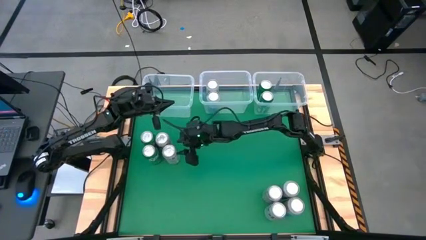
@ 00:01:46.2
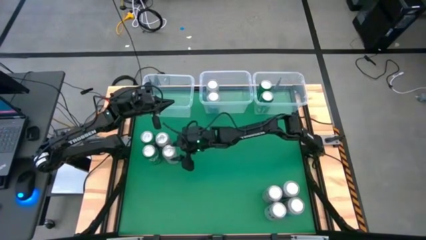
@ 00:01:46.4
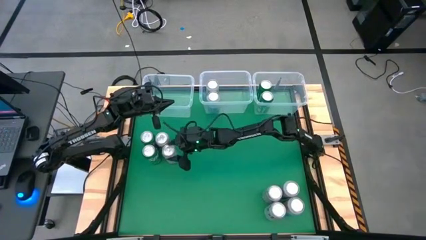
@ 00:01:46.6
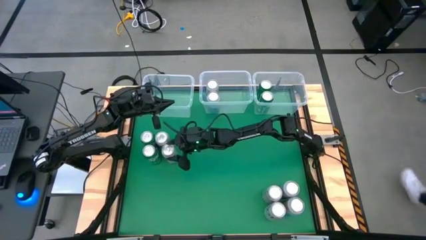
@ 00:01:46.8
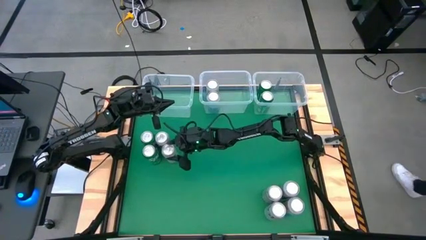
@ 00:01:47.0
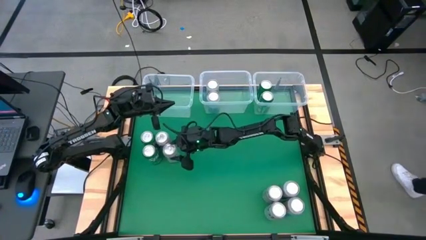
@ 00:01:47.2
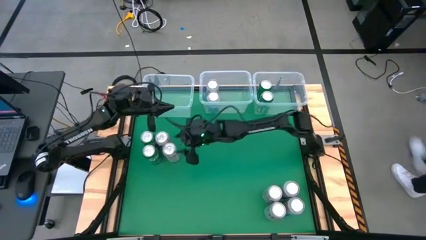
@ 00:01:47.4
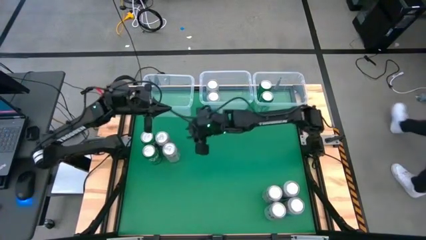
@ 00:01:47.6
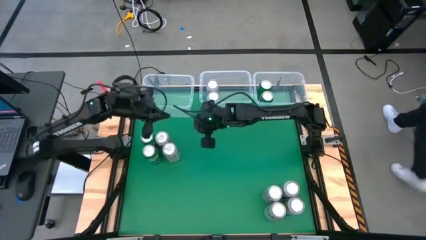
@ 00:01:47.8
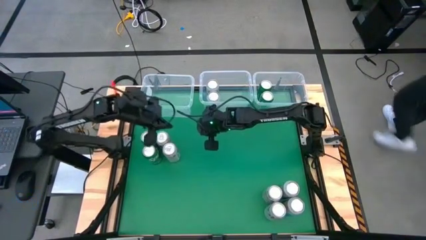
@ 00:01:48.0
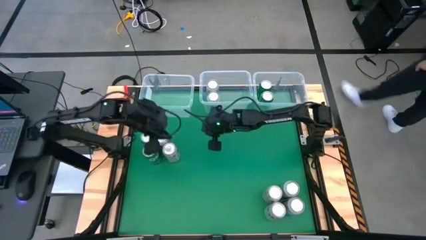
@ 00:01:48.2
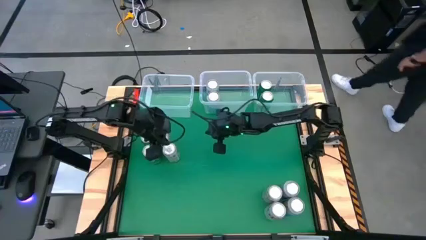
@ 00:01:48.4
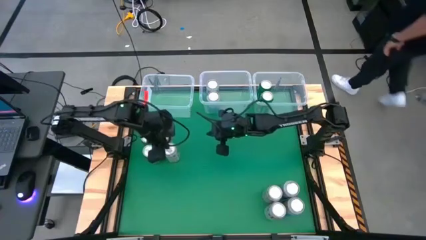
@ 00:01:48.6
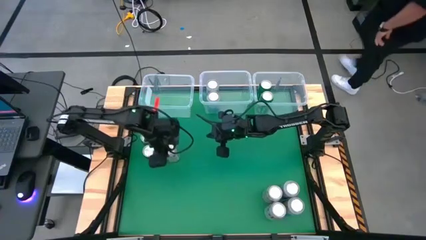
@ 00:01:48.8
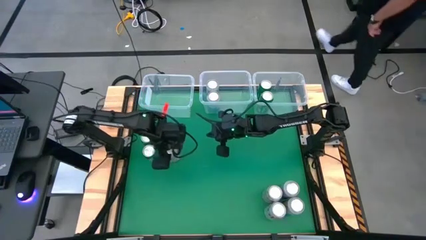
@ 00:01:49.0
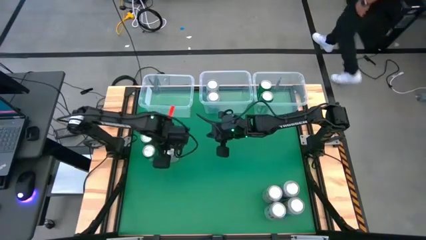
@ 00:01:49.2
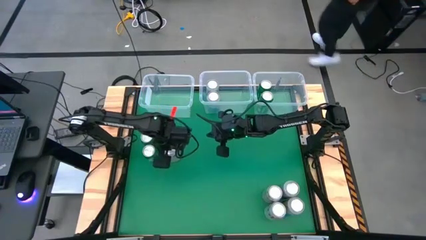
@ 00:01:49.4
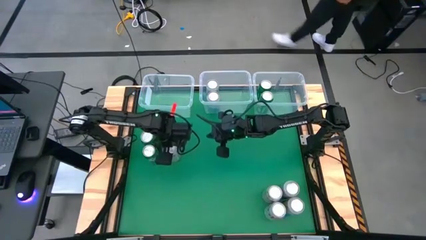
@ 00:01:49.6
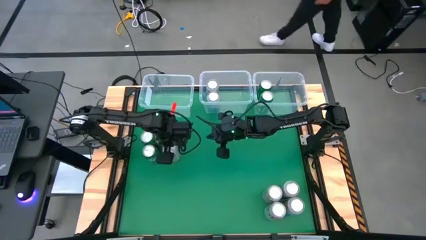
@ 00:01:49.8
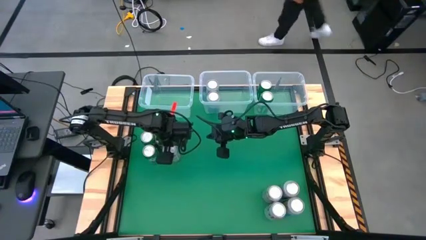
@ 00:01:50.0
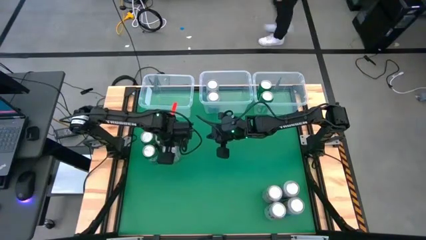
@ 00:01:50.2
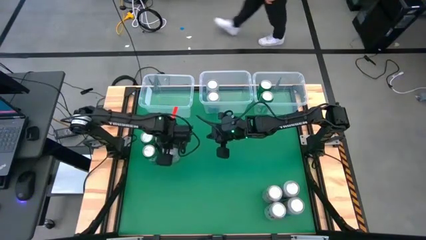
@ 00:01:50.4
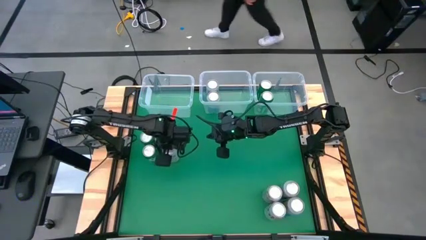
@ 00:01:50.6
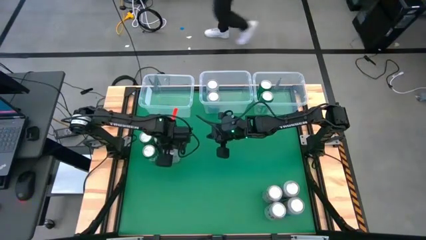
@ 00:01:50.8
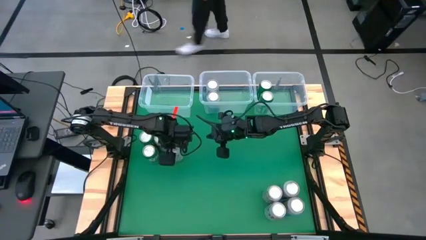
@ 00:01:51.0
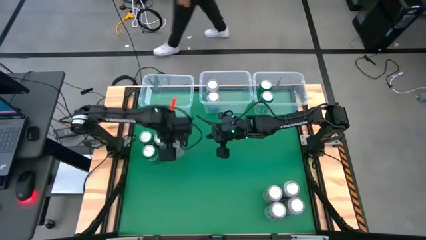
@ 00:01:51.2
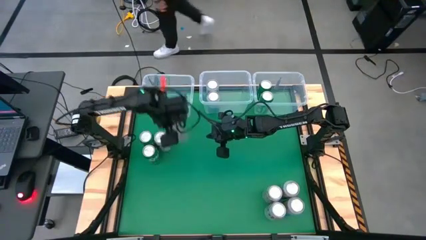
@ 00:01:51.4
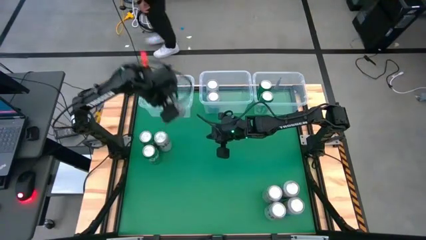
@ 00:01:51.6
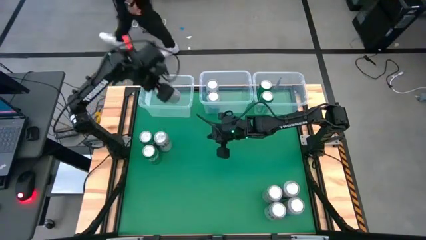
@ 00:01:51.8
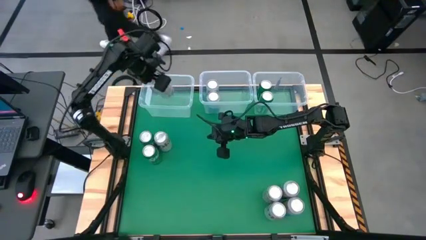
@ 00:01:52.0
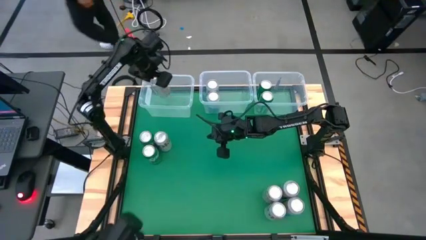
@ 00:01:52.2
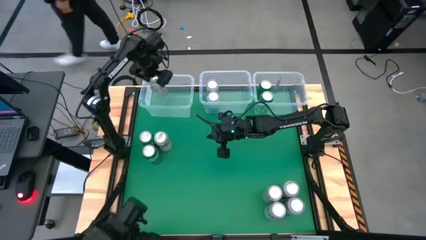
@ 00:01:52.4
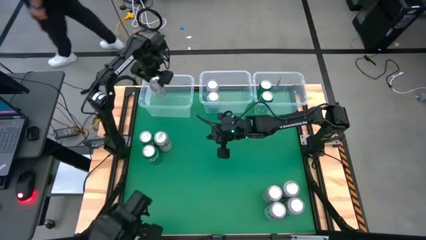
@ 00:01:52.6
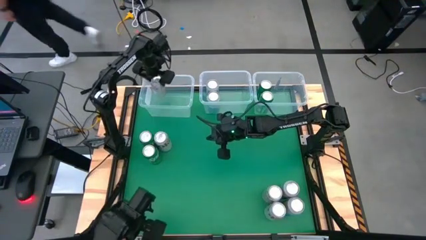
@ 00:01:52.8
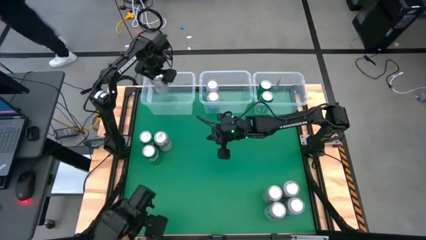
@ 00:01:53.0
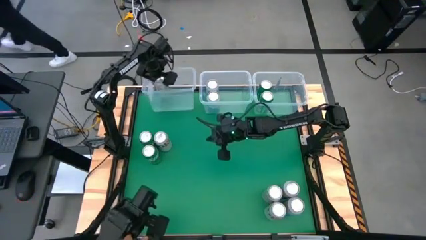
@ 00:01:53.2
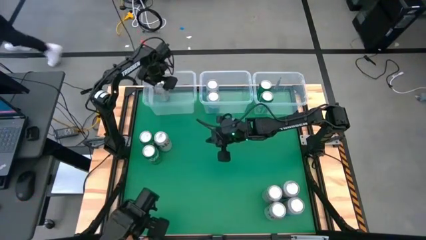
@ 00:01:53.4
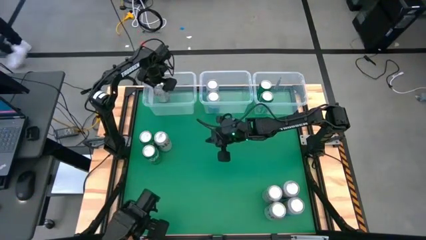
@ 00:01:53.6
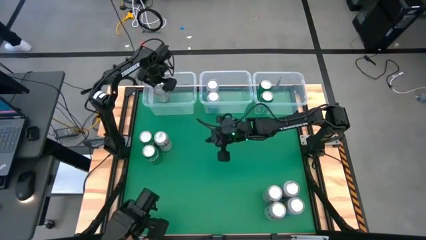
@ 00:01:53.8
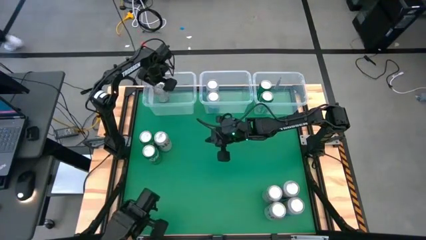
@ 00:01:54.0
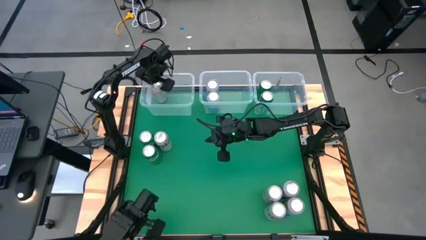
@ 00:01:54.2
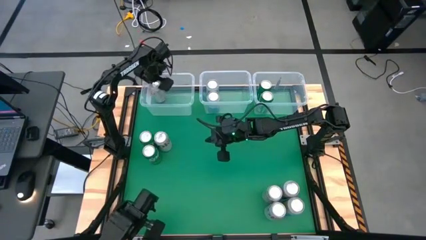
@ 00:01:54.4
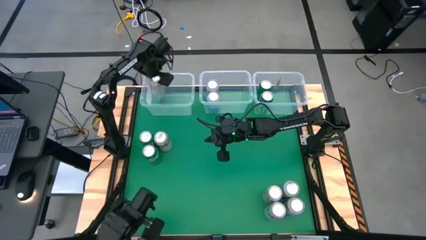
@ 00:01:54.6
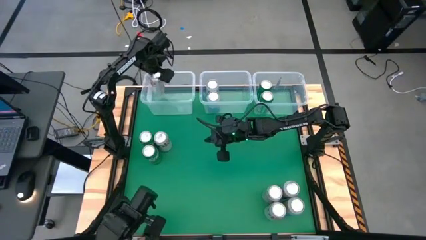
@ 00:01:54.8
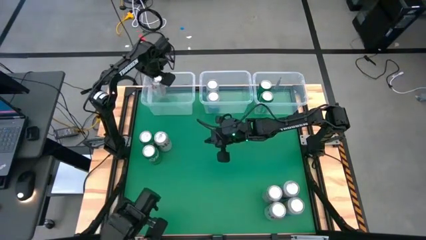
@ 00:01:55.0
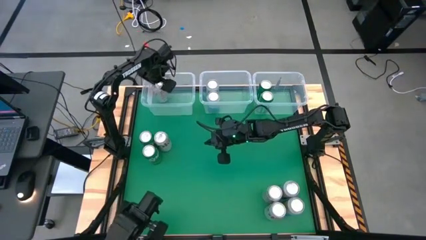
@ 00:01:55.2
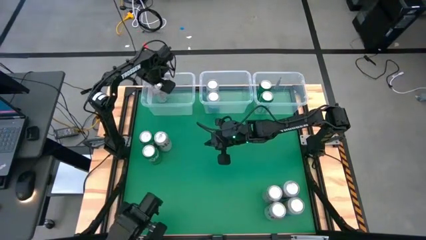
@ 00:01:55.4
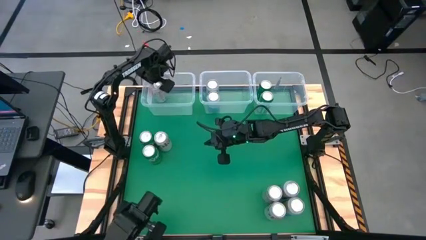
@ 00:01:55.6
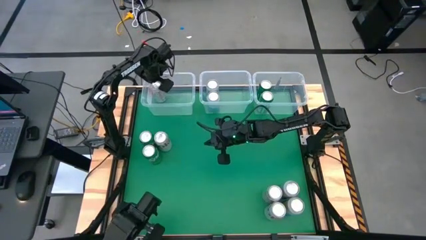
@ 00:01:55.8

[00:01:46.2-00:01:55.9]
Task: Sort soda cans
Put the red silver soda can into the left transparent bin

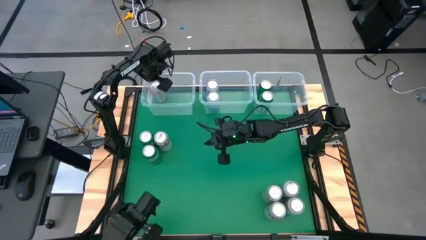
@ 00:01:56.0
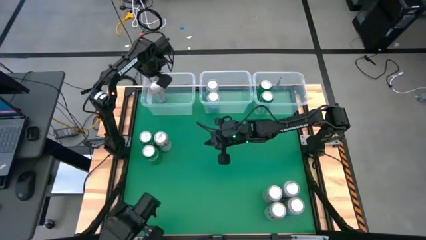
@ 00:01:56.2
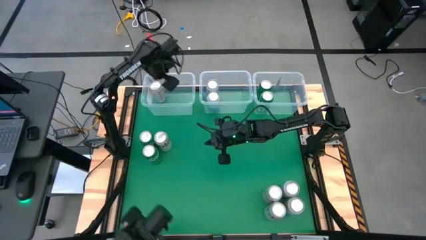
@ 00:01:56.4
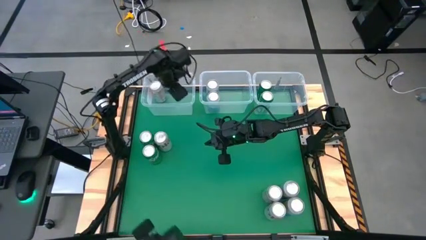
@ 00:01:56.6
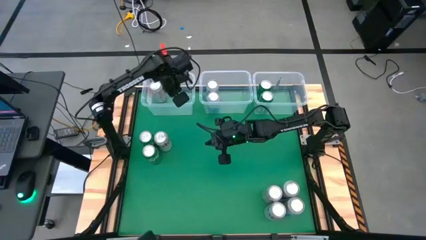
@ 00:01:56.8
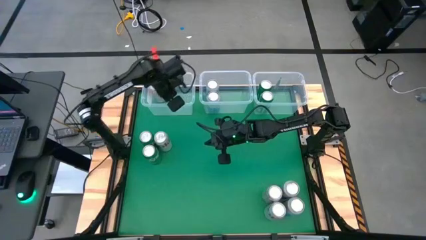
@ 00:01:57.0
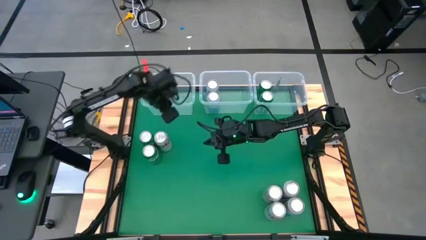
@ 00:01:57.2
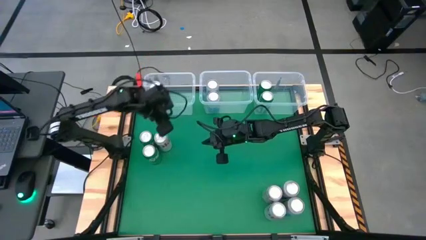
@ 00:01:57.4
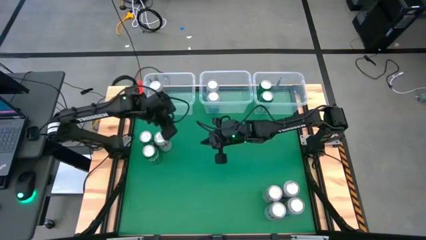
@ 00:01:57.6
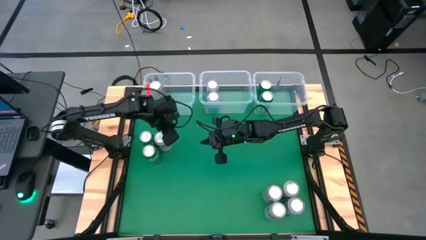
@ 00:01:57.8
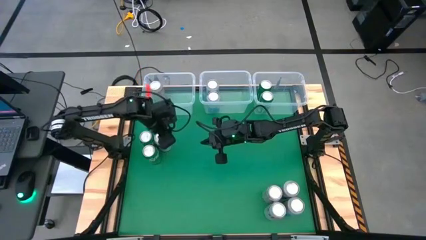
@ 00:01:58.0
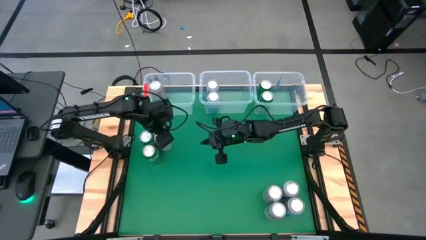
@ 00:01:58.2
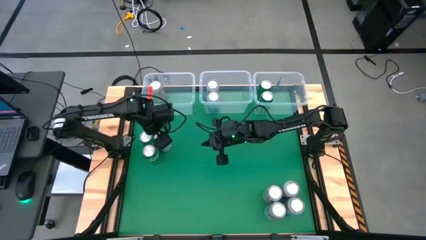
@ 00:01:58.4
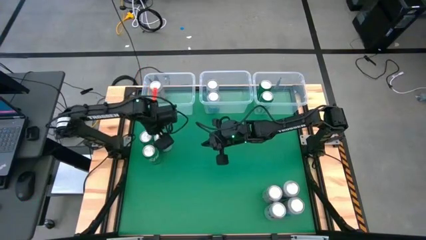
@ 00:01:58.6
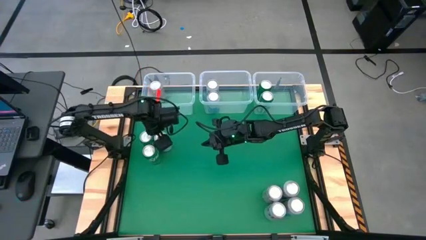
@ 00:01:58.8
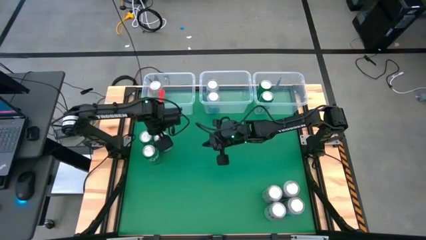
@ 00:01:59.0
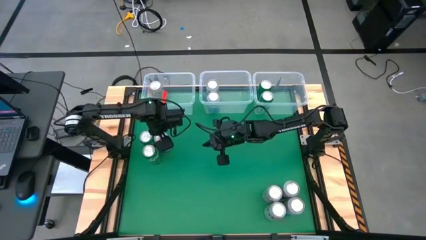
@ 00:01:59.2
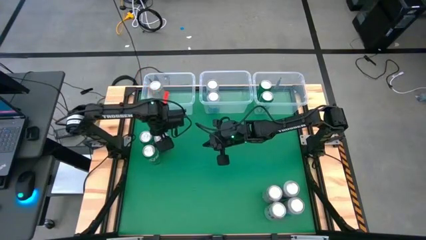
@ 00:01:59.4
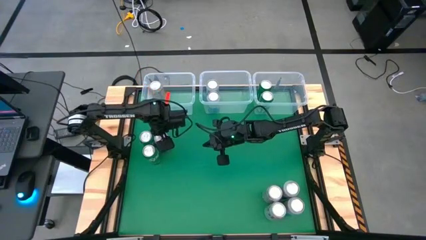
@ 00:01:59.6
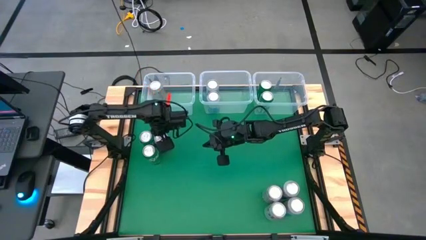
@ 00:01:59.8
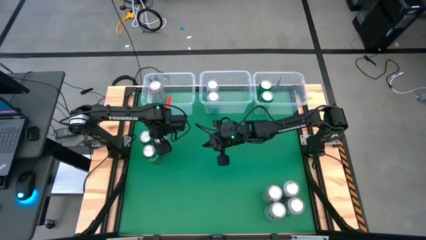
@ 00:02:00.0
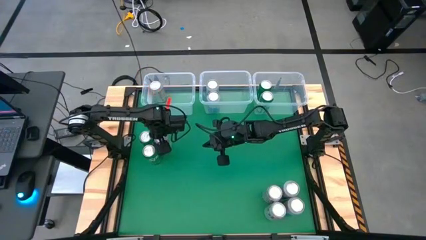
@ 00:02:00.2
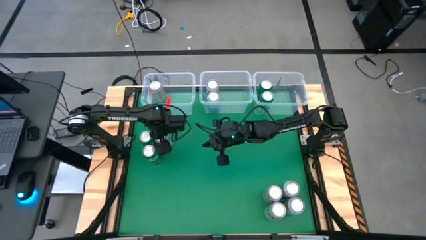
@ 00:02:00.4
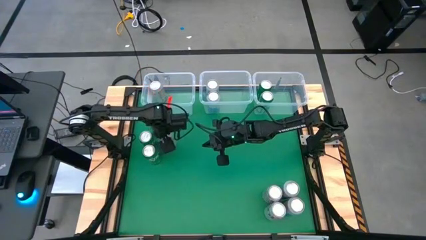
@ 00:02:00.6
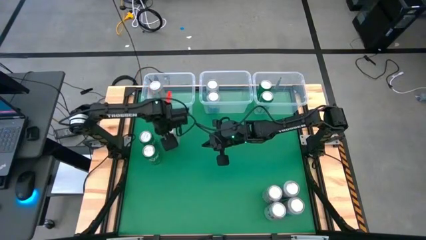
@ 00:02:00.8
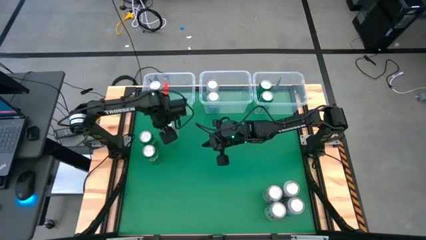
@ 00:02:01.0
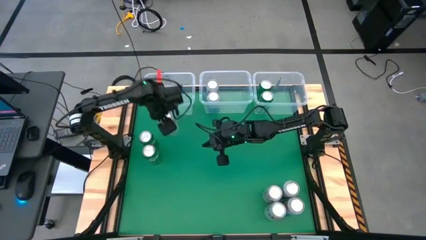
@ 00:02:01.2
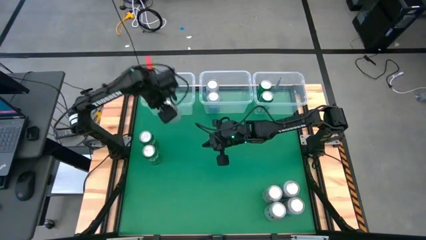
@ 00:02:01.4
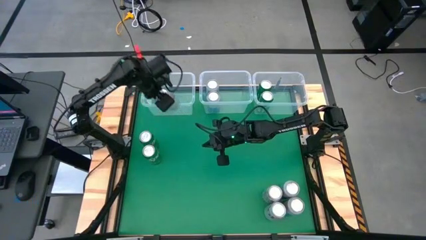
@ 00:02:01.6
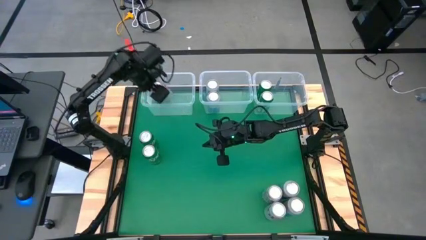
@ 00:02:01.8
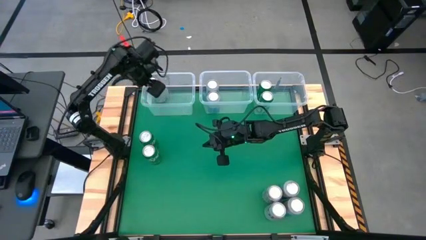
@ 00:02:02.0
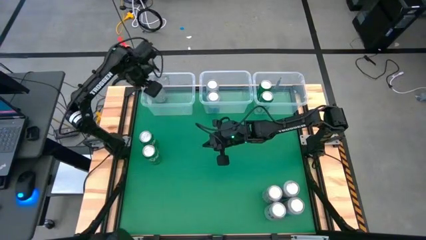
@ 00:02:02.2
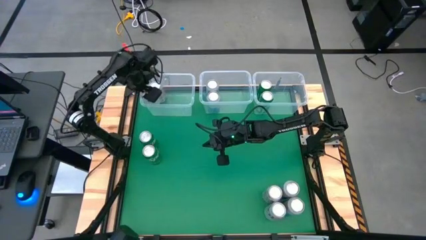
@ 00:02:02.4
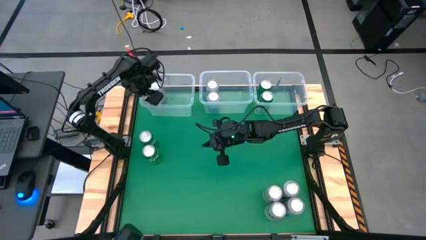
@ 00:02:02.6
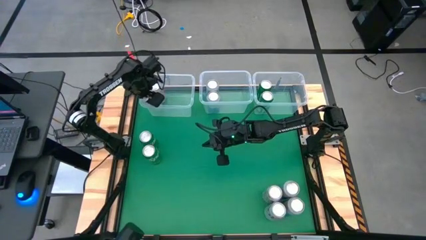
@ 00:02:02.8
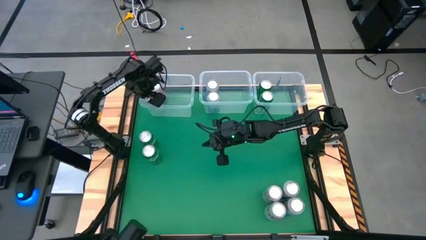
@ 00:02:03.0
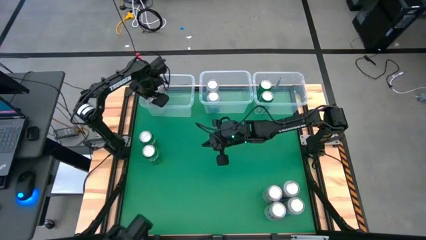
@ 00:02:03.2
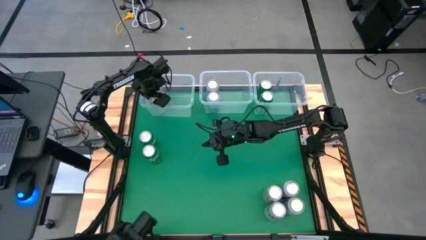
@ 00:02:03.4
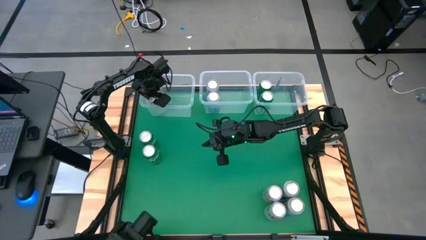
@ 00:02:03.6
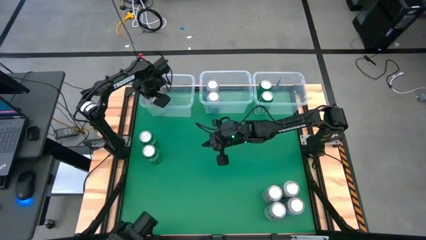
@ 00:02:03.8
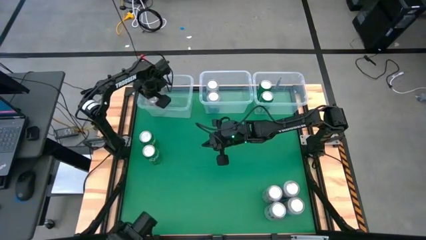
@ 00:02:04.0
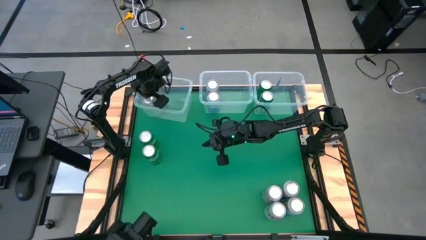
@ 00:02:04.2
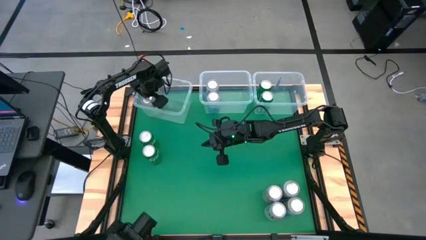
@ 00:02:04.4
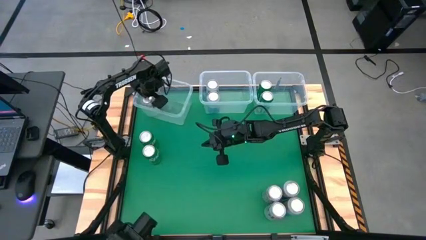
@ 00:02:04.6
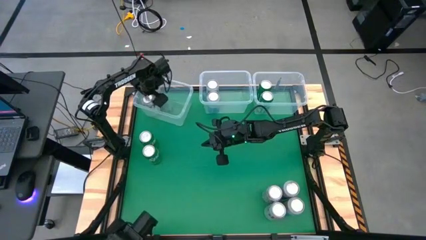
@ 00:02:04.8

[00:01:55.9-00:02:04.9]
Put the top red silver soda can into the left transparent bin
